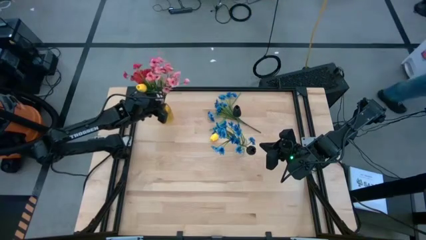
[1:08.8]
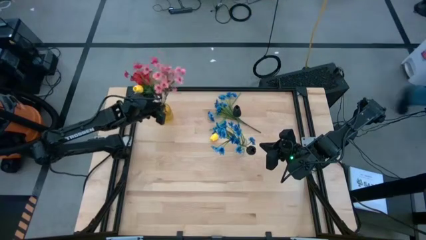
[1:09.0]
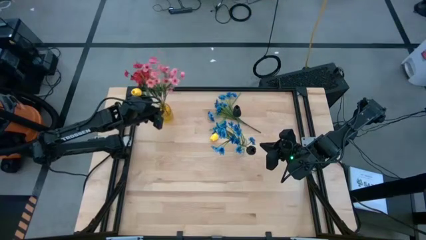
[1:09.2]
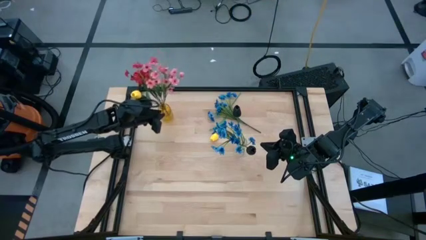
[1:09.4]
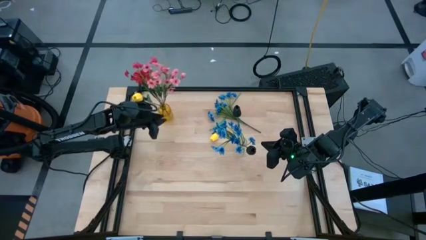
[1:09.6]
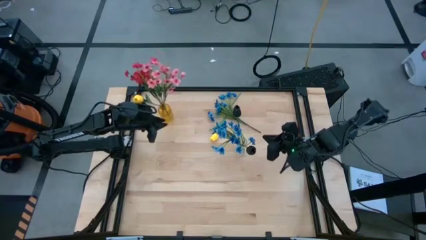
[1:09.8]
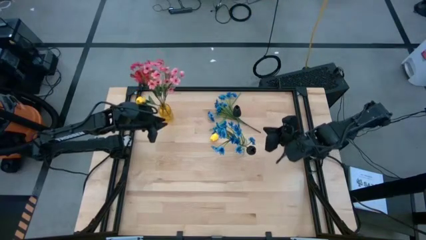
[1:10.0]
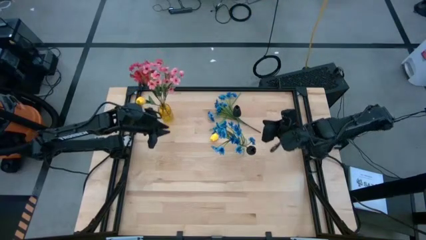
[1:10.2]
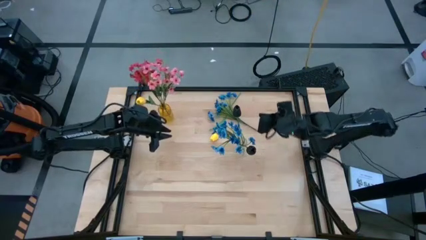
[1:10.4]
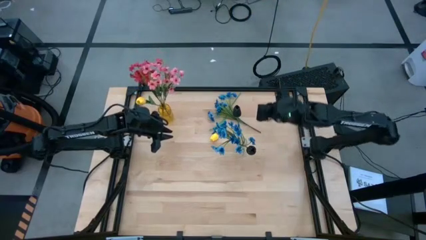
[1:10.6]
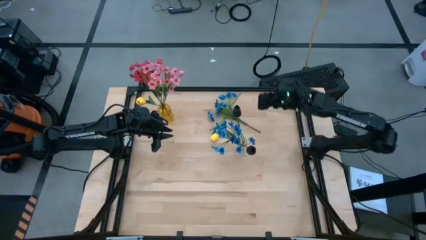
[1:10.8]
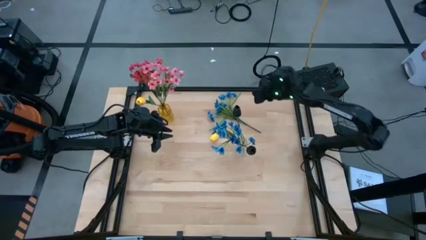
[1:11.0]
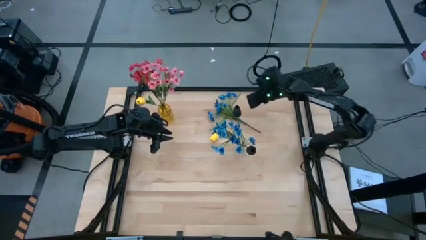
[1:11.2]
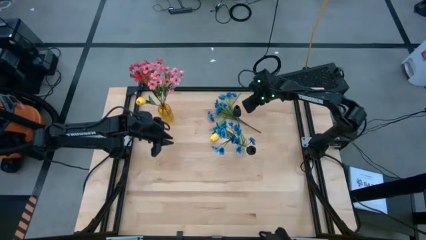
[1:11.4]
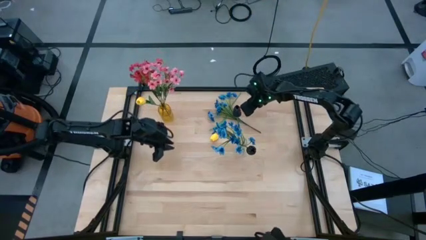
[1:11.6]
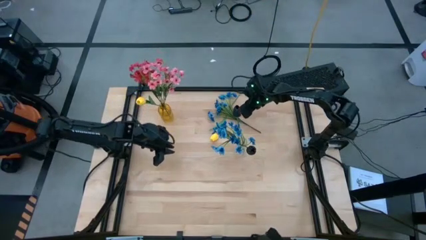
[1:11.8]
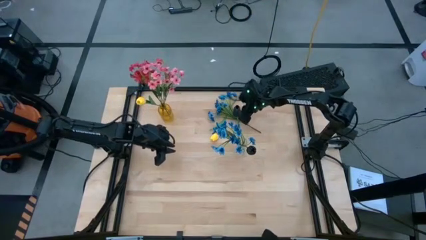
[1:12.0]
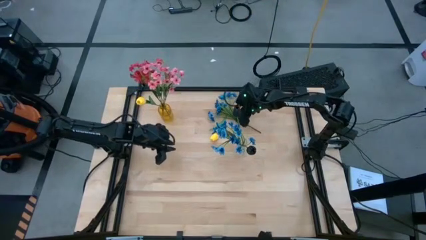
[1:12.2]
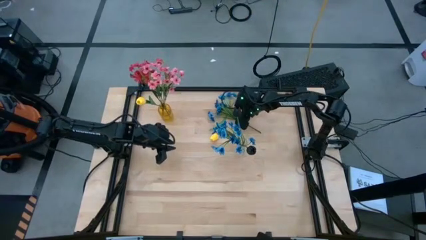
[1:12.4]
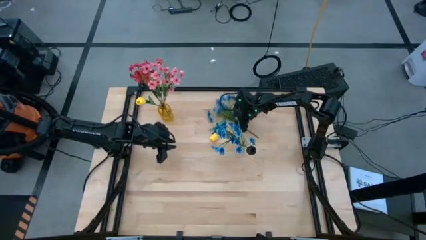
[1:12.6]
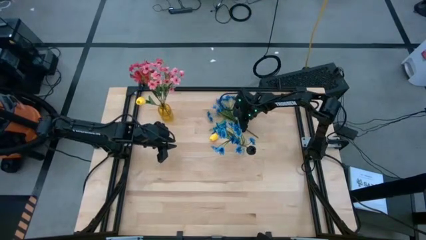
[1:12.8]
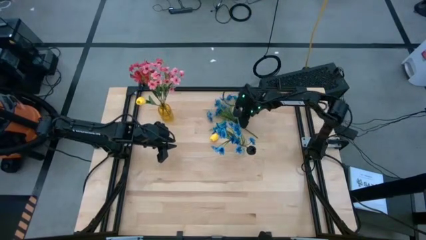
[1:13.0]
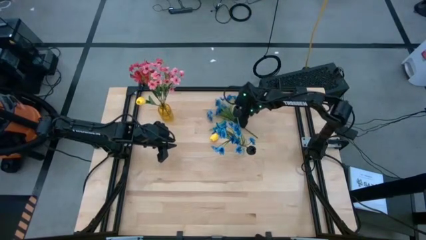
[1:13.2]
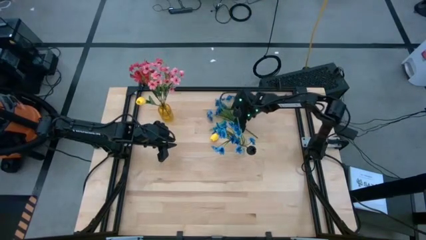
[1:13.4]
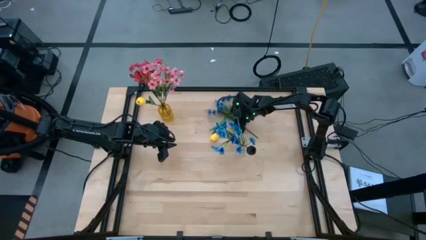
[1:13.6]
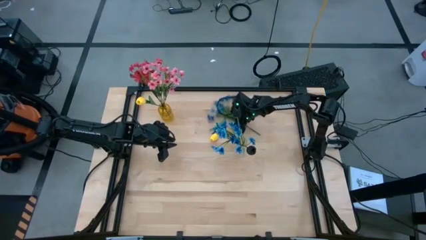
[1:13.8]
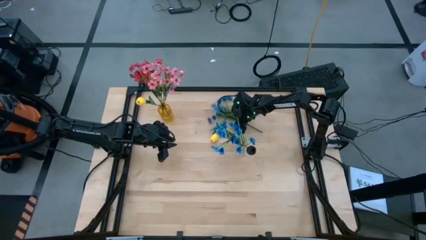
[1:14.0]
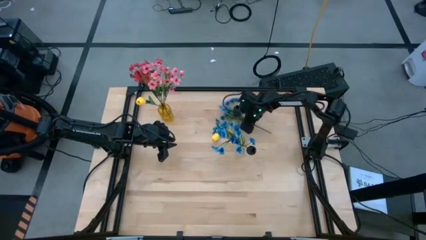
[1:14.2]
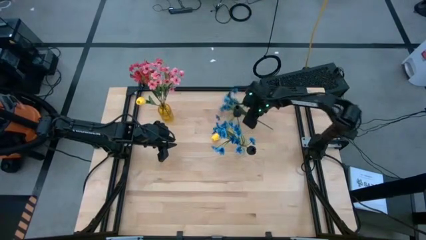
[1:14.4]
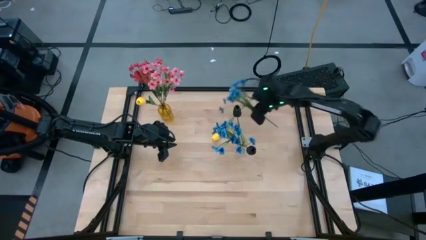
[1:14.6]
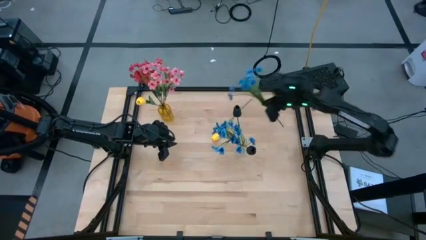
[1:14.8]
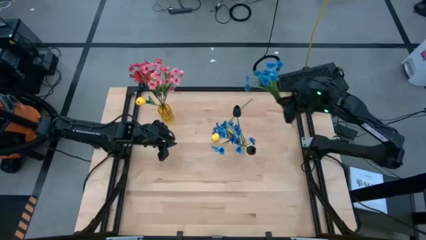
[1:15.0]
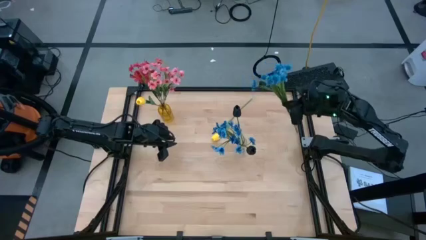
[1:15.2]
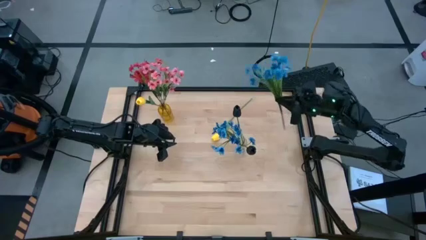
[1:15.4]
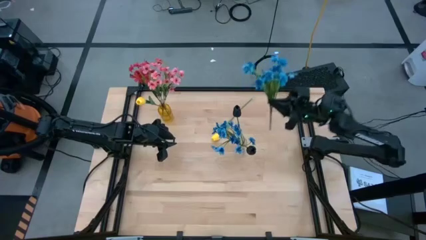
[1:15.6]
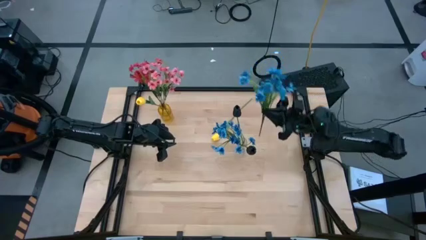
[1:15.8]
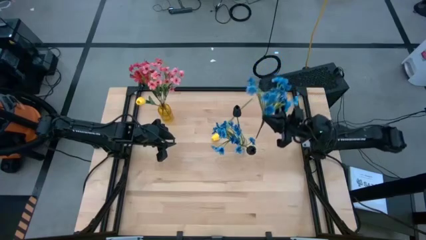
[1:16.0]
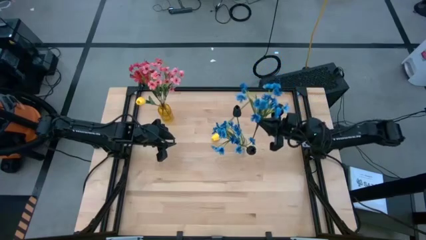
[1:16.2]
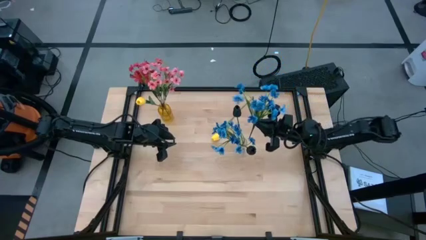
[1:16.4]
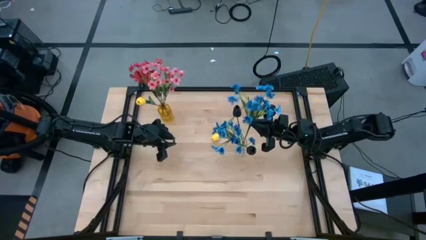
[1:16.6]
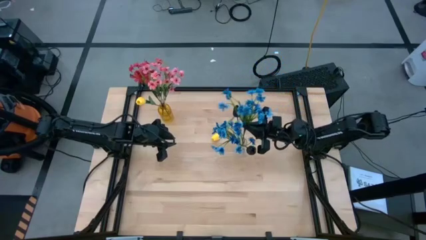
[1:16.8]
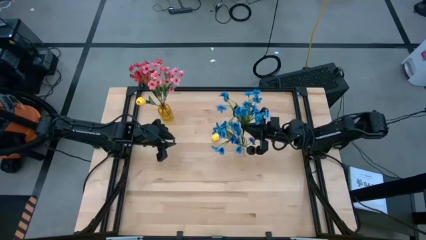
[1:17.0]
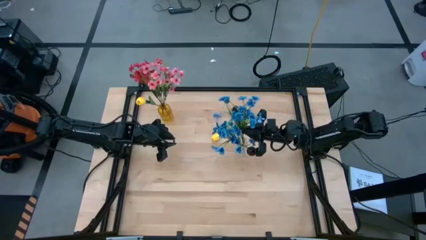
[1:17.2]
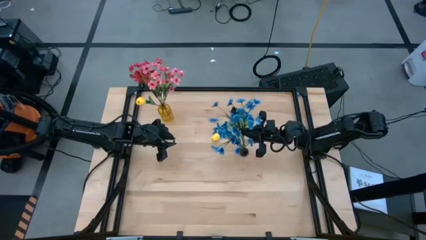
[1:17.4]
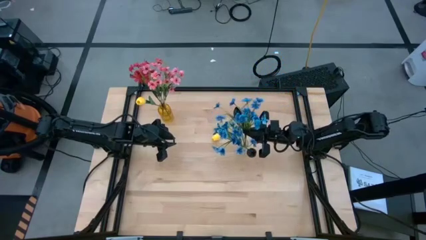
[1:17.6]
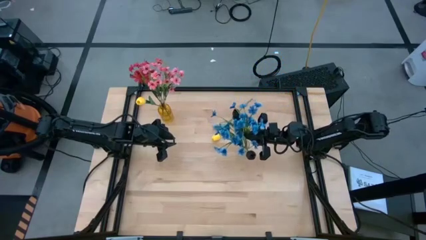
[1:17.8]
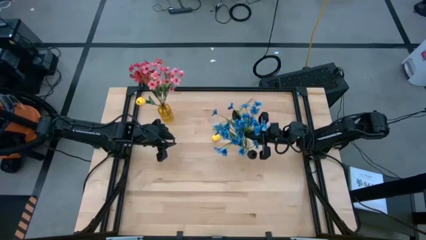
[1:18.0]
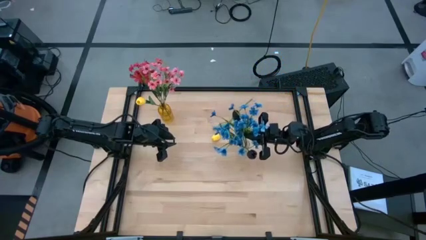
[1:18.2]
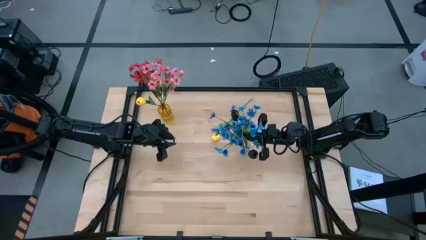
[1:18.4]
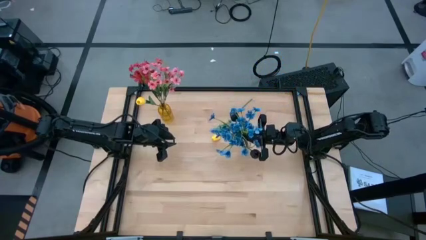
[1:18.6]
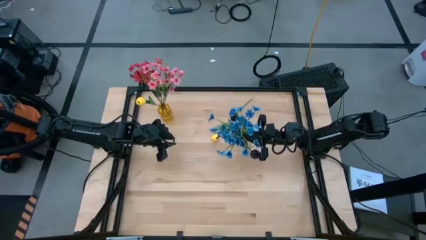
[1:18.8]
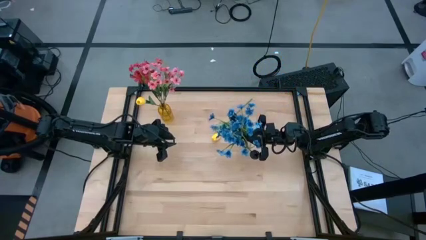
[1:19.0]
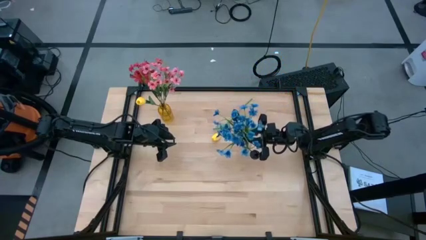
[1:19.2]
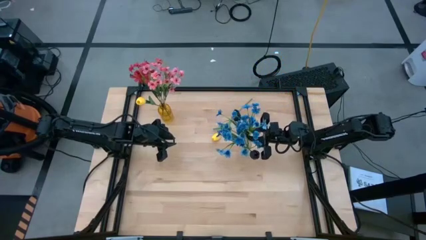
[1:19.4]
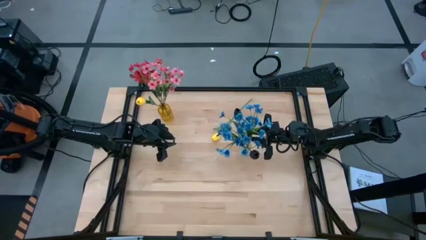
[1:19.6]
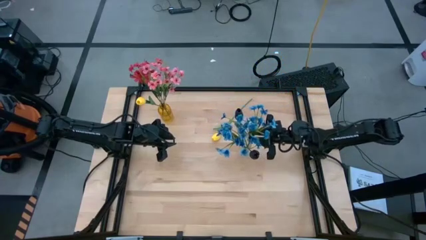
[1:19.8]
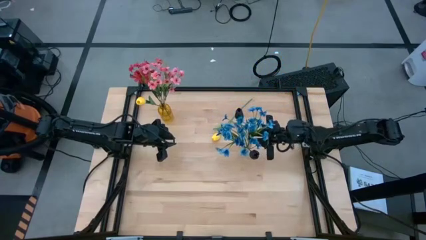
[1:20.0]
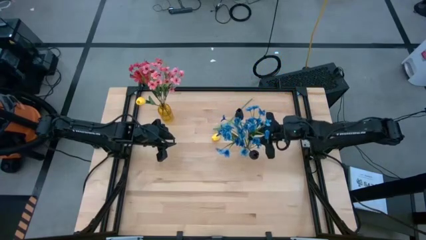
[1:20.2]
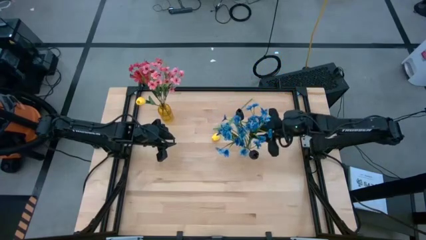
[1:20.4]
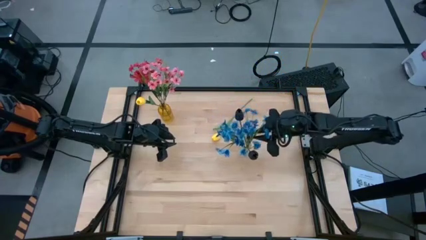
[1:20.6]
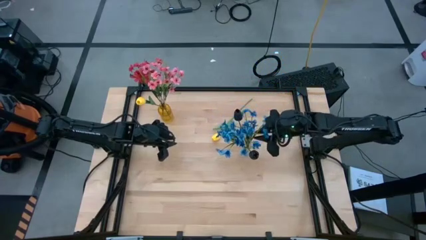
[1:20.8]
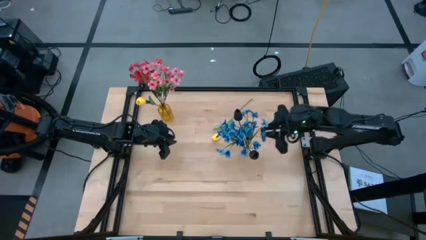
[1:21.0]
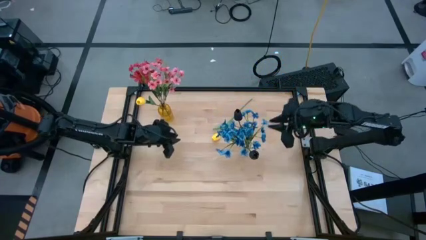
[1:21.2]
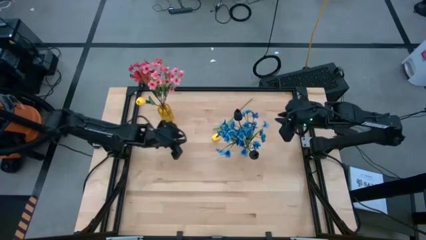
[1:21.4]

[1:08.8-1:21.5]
Task: Sort flowers into vase by color
Put the blue flowers into the transparent vase

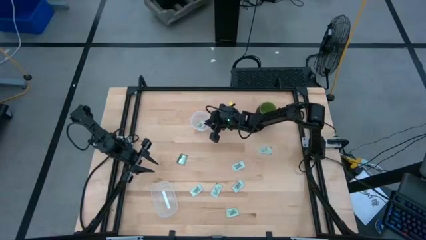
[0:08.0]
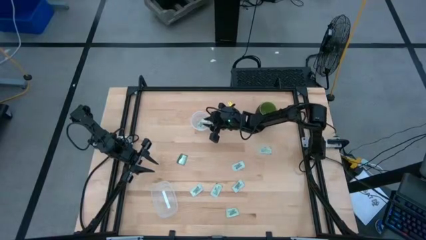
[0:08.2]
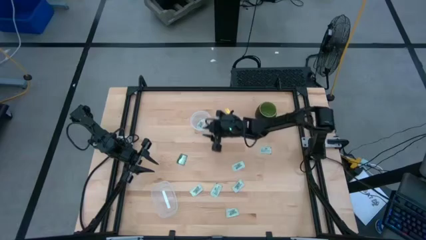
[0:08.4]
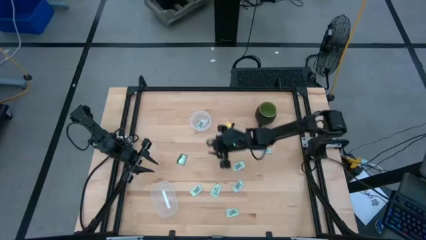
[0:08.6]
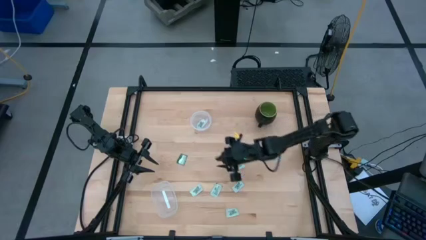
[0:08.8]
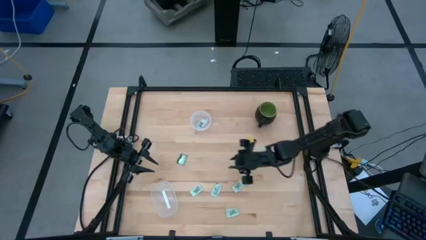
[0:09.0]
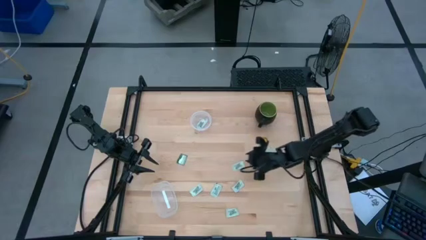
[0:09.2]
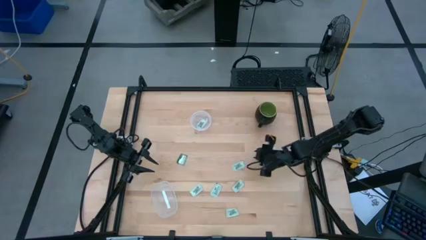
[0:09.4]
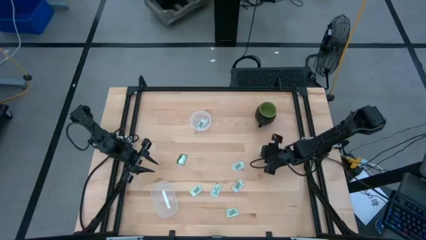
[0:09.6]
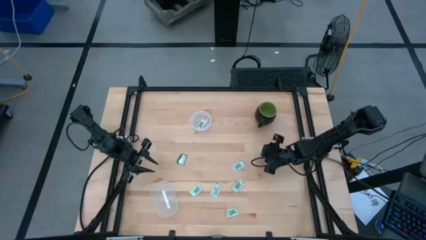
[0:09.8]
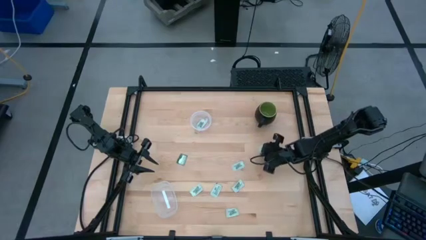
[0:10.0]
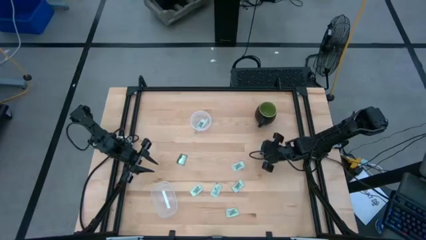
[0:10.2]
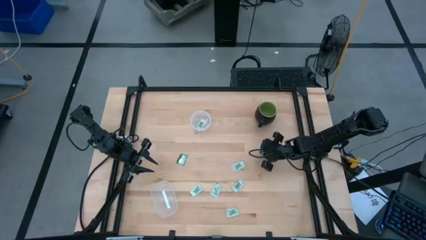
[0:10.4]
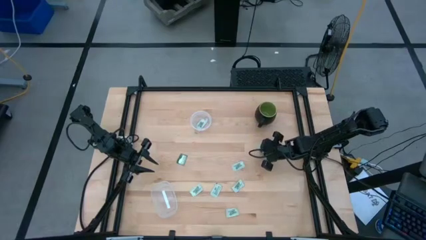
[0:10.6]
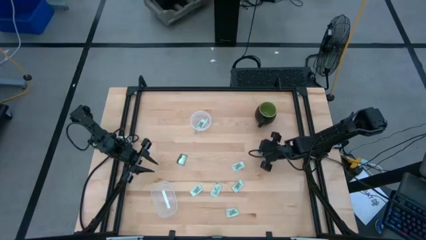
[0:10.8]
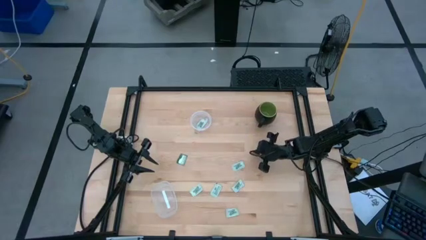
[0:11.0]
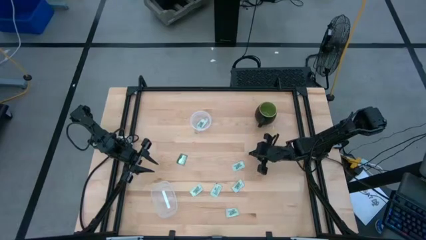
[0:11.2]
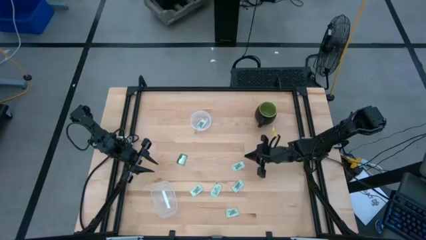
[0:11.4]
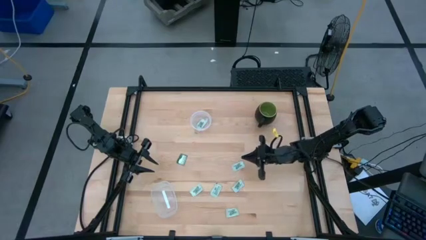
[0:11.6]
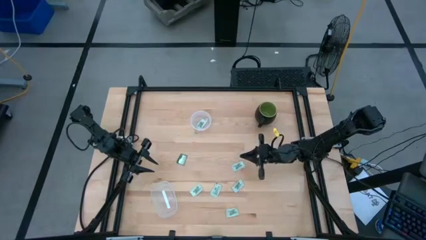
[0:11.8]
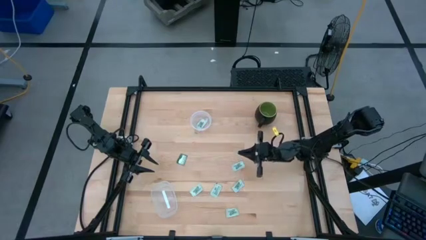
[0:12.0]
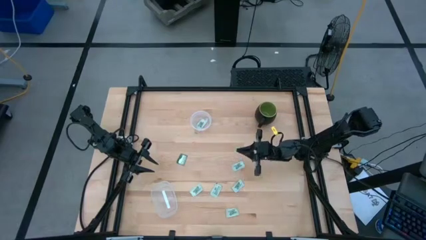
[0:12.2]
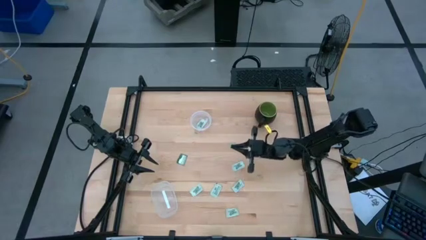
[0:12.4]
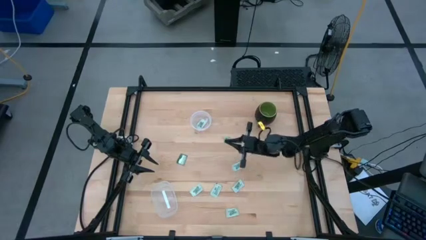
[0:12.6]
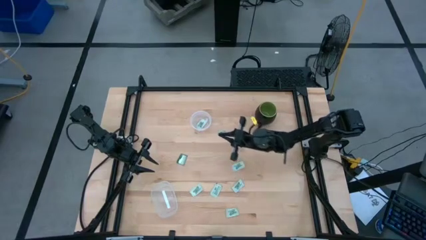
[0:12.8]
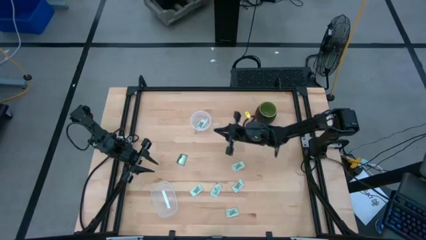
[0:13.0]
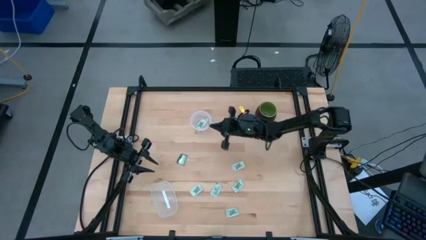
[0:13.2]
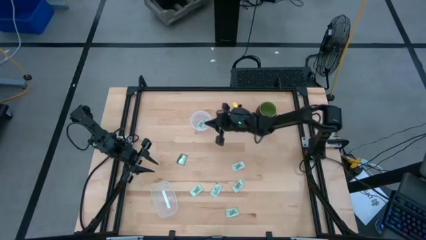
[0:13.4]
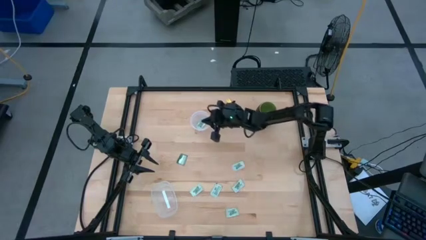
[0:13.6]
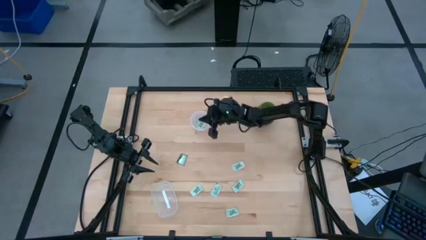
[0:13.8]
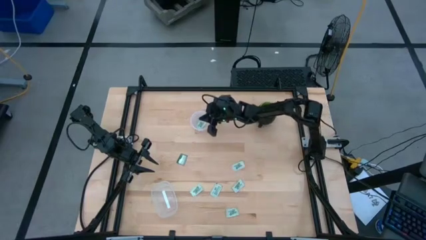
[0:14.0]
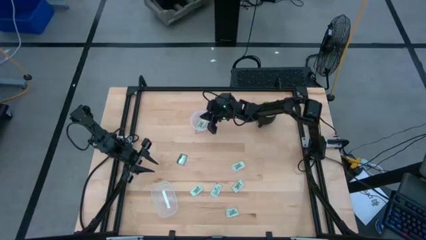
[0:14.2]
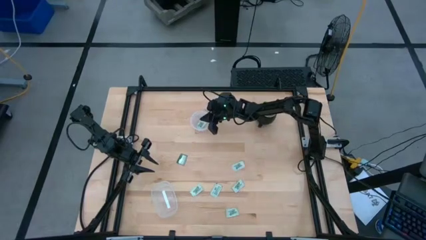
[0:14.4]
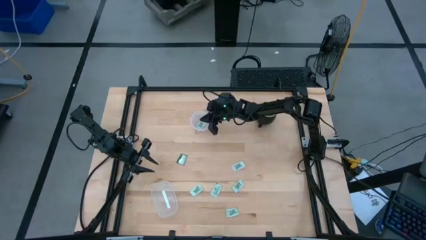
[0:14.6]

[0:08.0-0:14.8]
Task: Pick and place Stevia / Truvia into bins
Put the stevia packet into the transparent circle container
